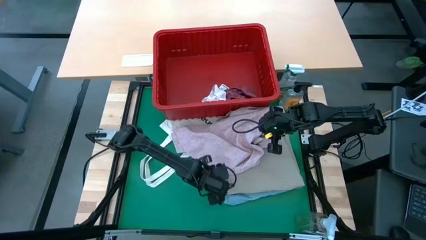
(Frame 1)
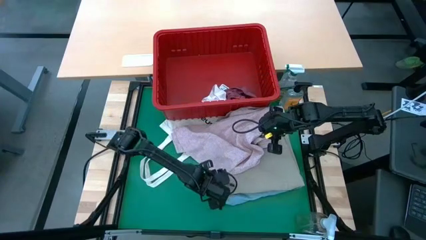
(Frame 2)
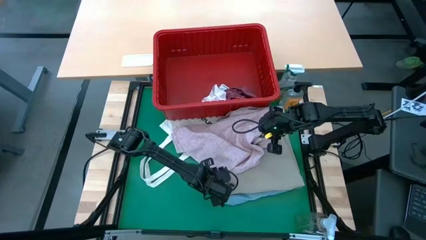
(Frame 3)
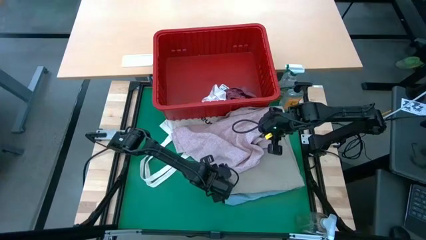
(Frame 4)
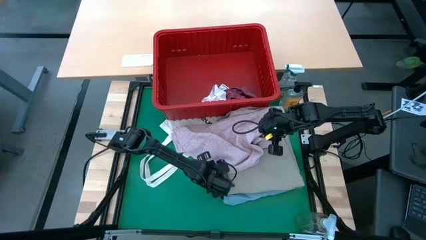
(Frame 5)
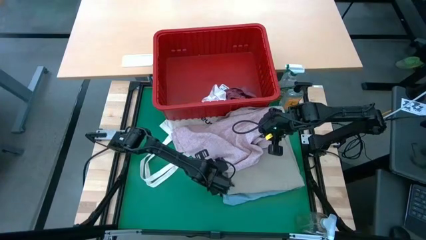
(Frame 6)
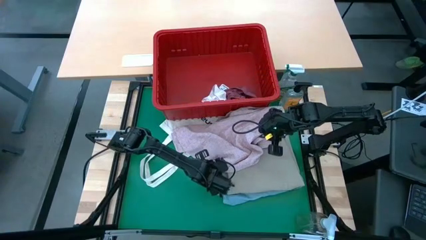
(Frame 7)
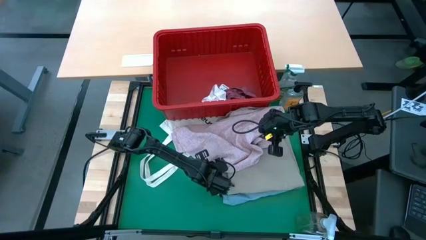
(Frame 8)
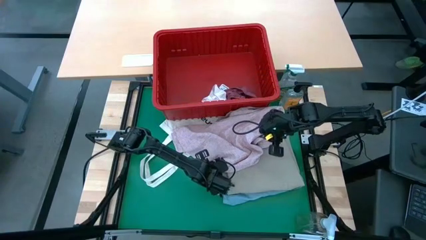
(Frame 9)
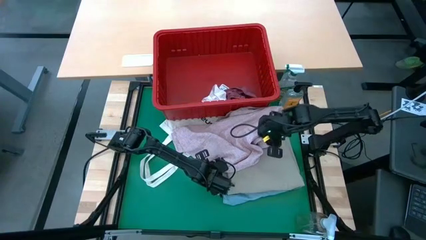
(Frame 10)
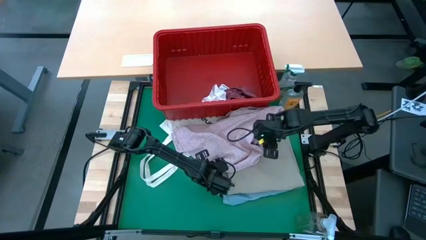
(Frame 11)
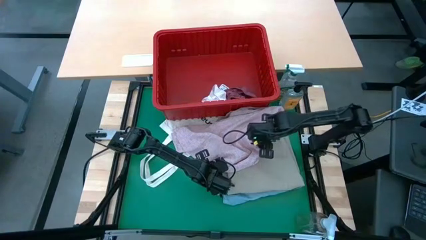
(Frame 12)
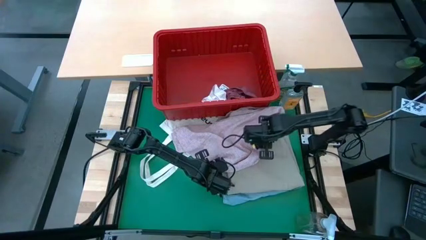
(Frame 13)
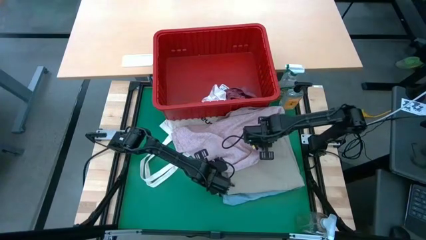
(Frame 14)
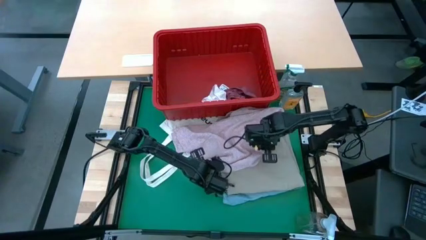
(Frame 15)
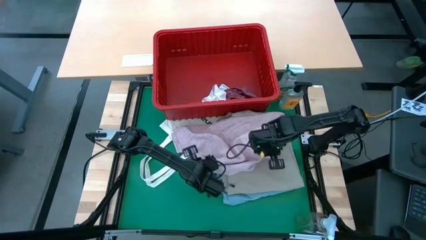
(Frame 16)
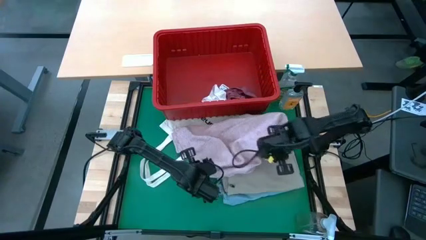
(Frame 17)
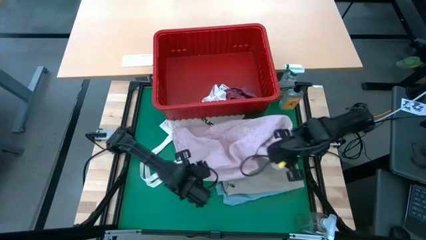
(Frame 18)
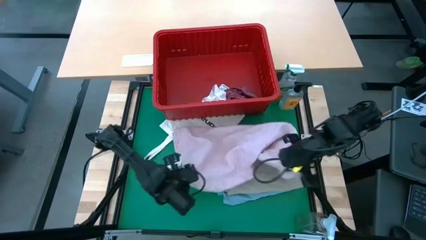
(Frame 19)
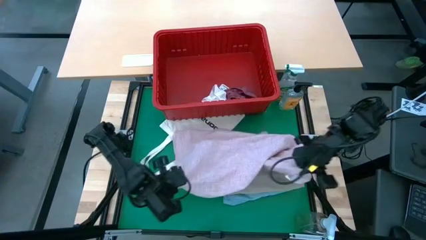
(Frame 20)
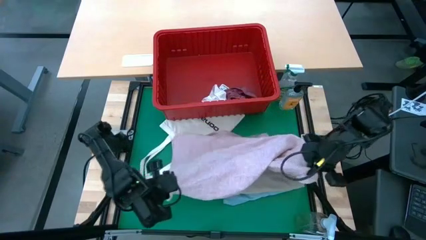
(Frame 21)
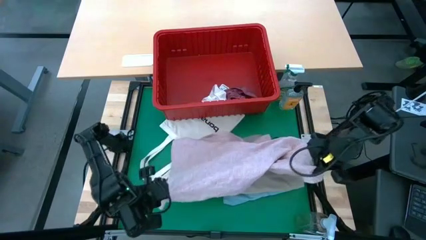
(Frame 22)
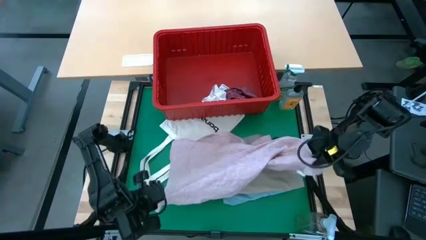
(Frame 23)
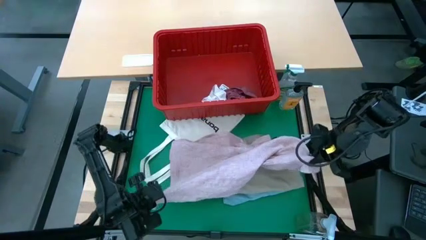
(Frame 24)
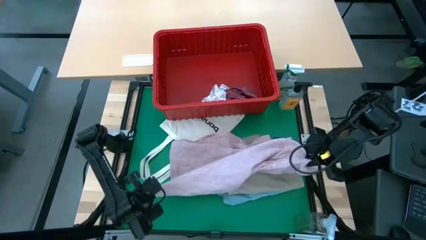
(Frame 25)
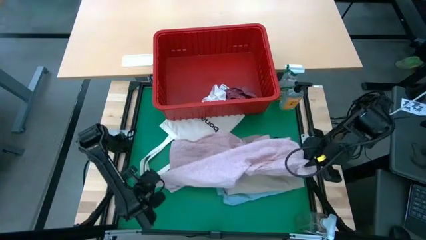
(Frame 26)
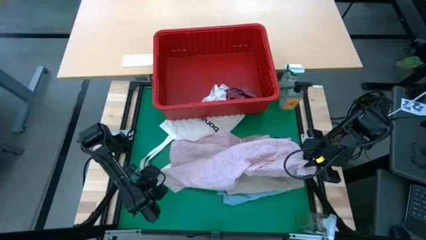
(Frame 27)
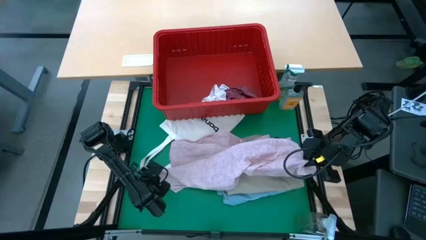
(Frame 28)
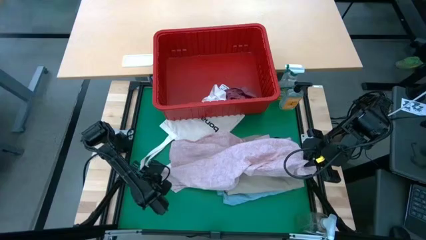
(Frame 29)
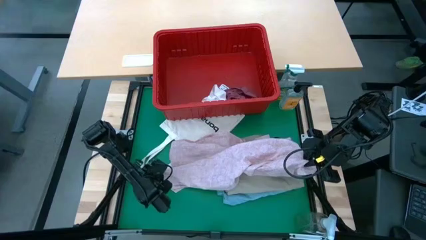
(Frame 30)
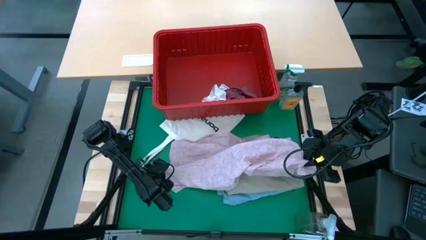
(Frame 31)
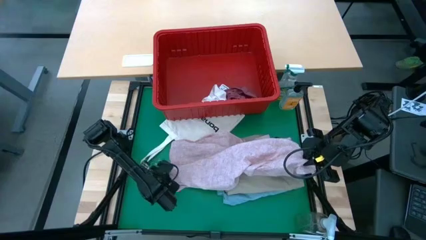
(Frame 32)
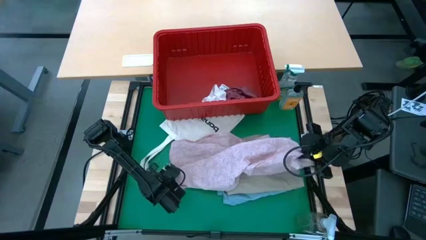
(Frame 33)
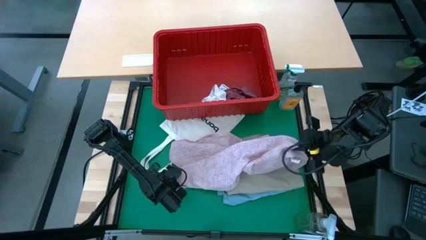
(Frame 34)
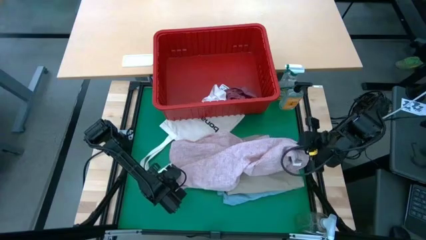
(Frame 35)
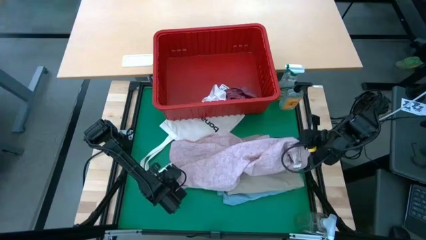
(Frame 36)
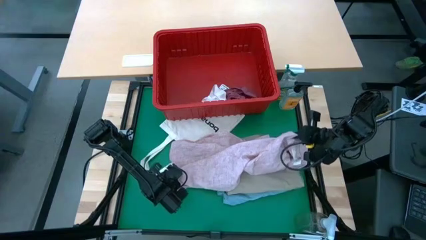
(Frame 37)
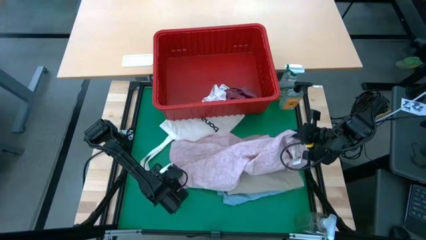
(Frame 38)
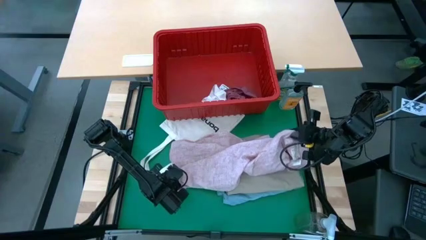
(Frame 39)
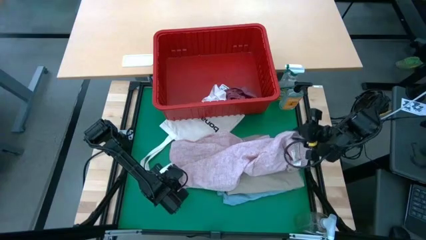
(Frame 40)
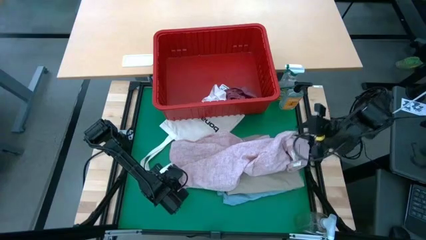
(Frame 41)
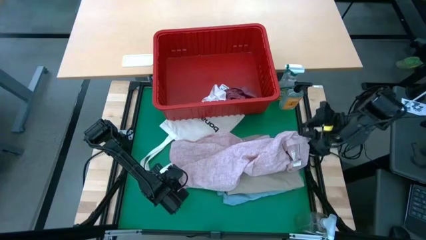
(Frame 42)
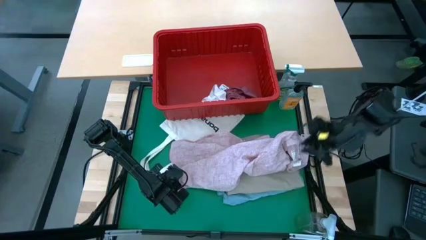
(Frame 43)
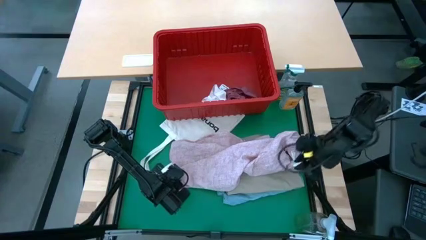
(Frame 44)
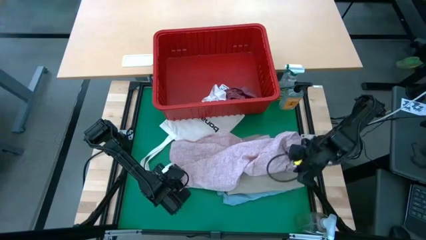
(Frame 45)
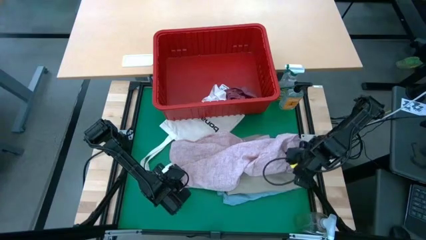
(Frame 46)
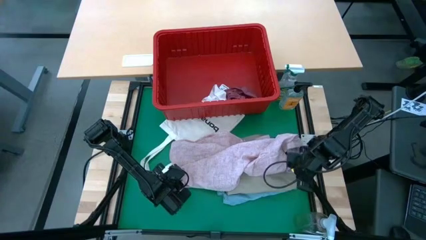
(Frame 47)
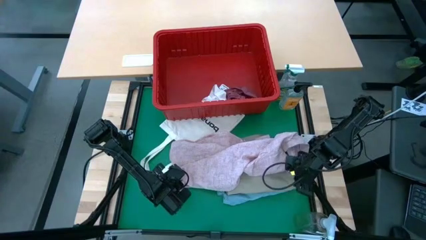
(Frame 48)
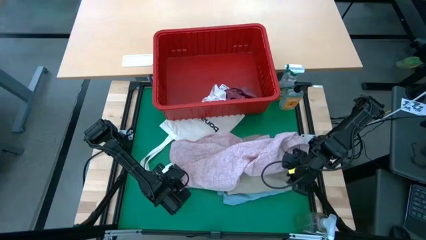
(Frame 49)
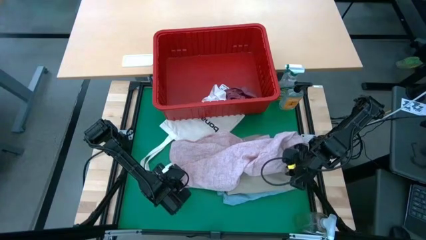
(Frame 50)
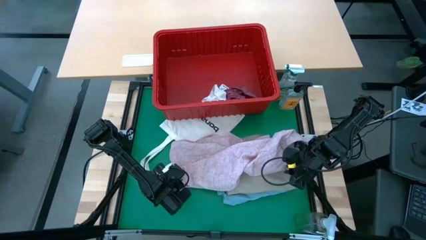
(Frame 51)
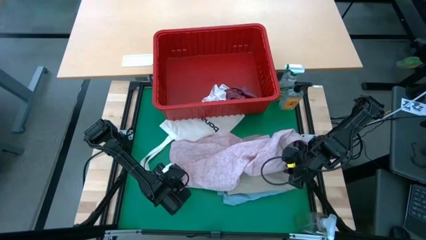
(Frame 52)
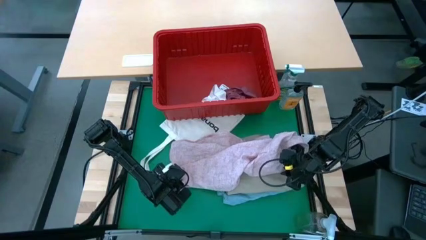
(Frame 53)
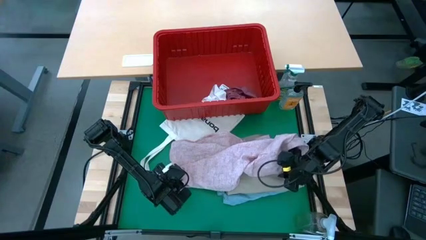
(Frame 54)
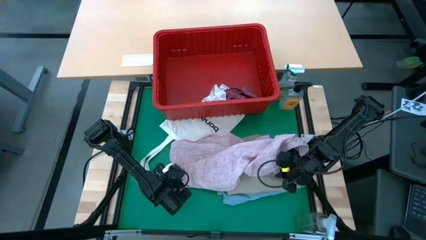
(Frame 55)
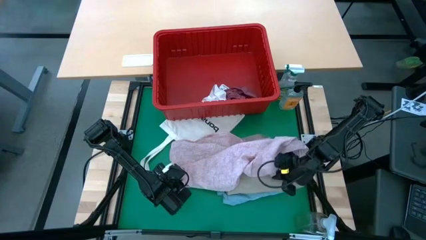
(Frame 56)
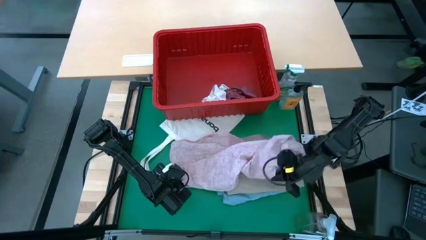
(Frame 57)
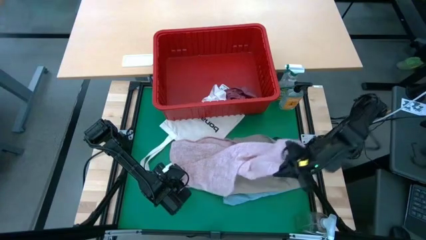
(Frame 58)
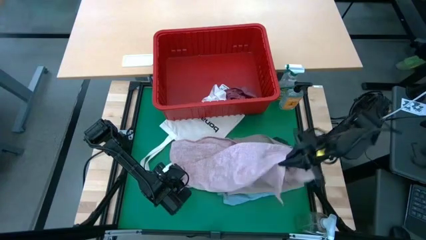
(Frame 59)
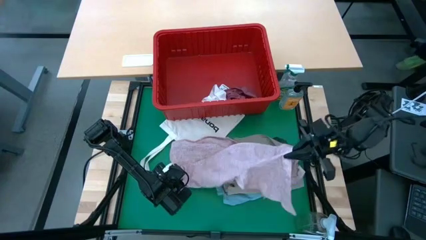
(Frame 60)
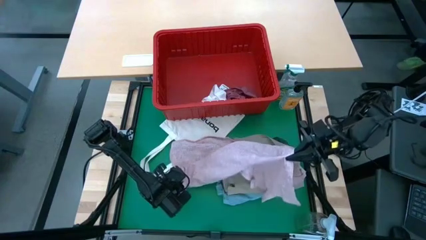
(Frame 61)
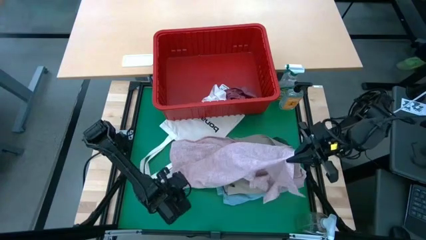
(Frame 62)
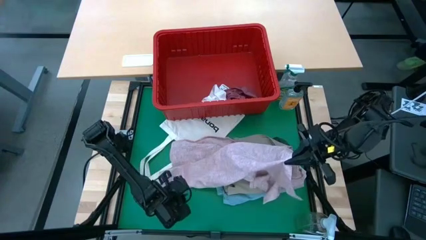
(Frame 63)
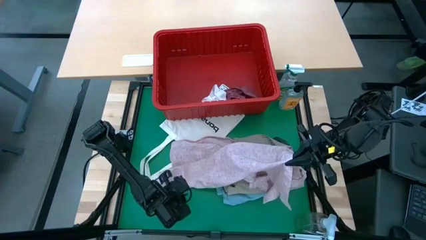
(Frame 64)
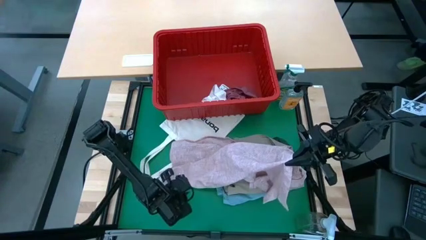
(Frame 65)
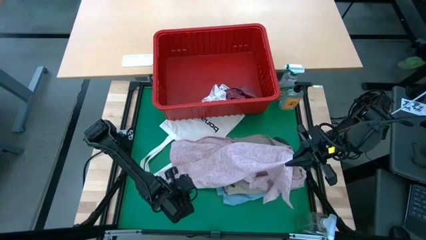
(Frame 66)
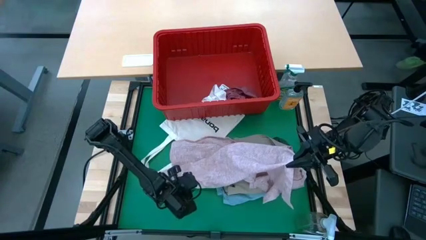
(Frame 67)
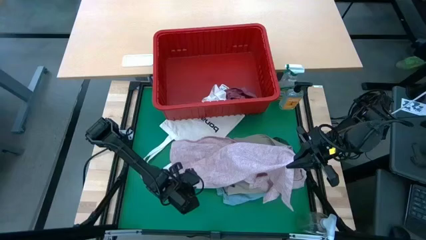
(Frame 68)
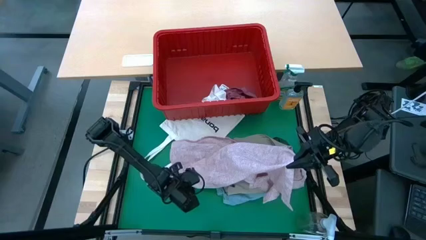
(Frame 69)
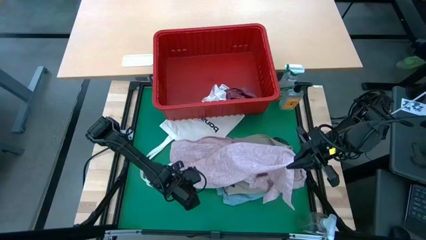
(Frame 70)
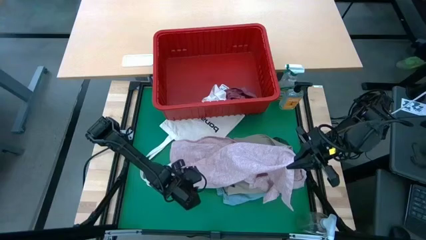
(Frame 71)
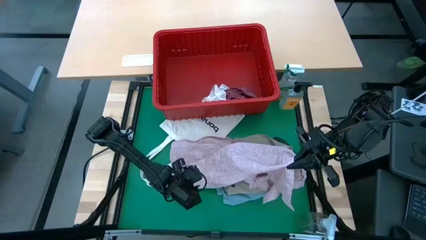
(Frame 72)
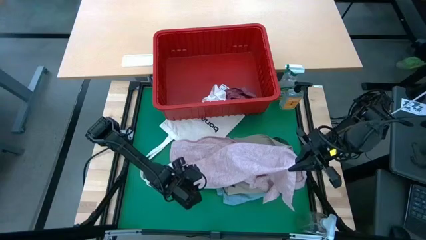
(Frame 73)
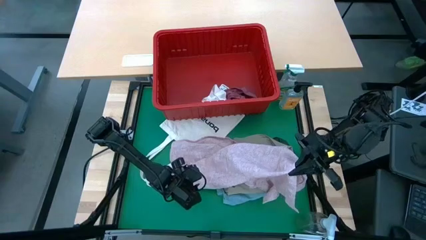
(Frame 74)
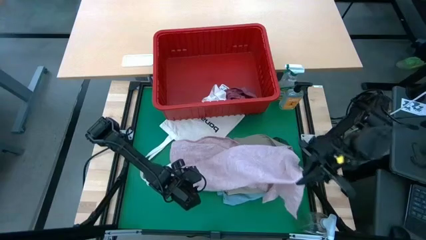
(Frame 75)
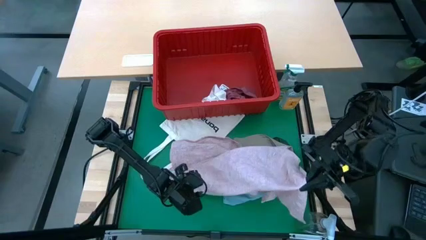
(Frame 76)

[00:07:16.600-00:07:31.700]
Task: Fold laundry
Fold the pink shirt
